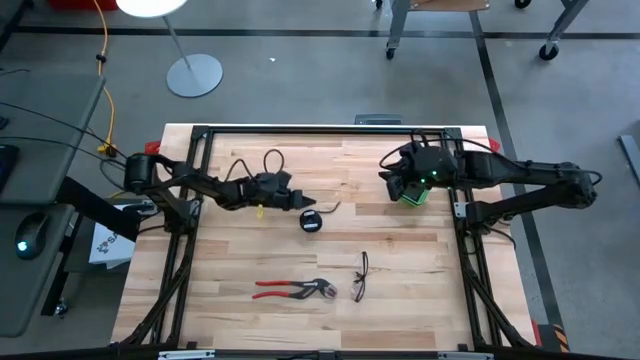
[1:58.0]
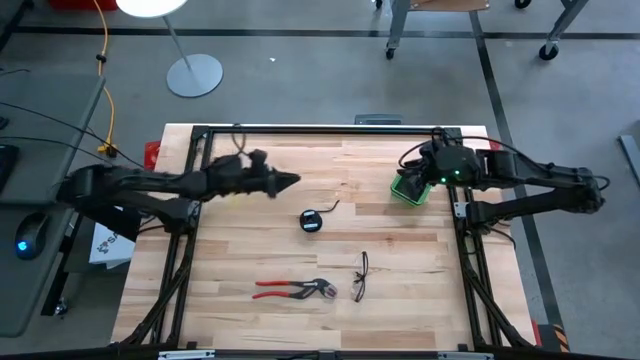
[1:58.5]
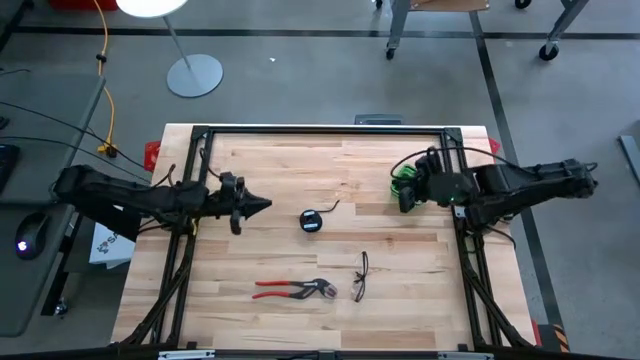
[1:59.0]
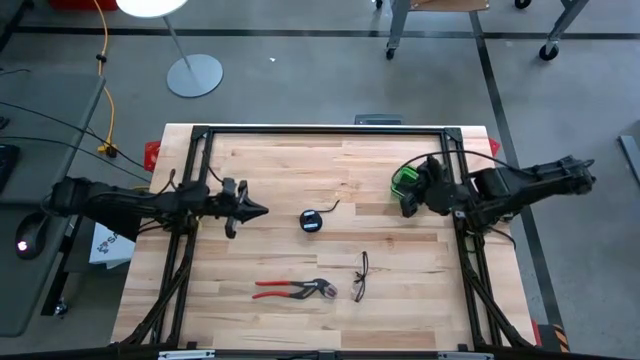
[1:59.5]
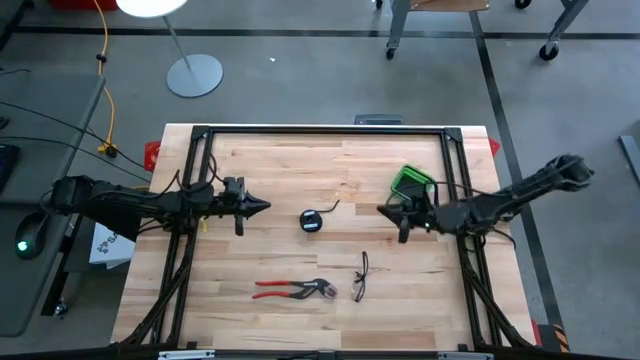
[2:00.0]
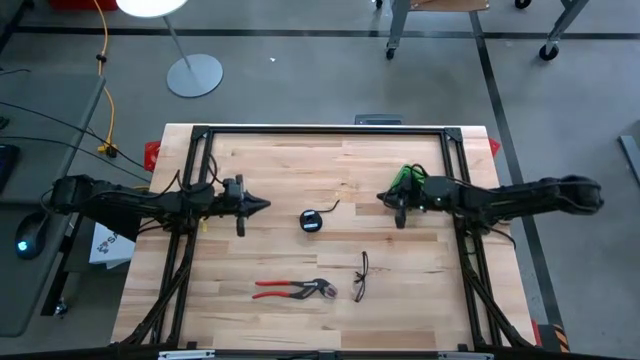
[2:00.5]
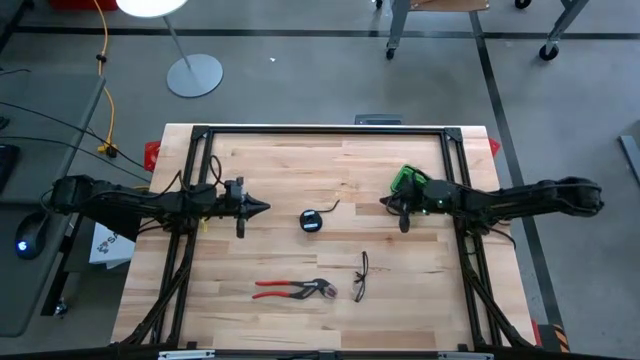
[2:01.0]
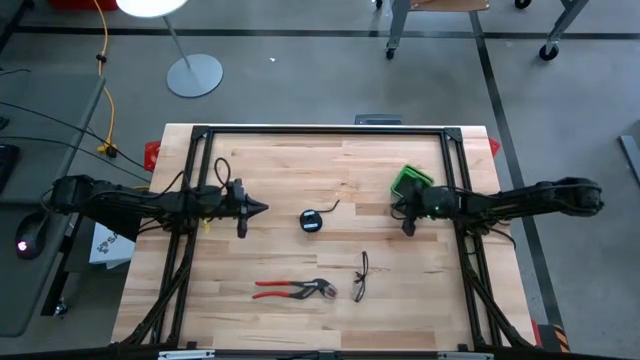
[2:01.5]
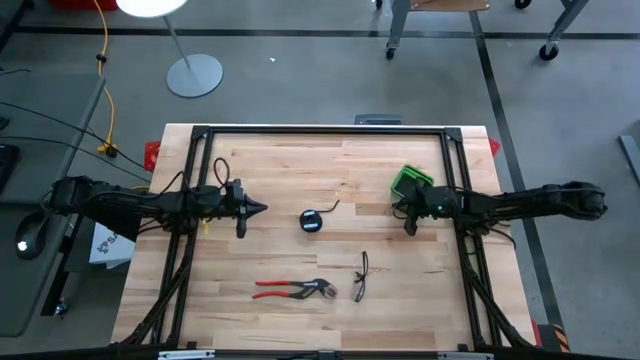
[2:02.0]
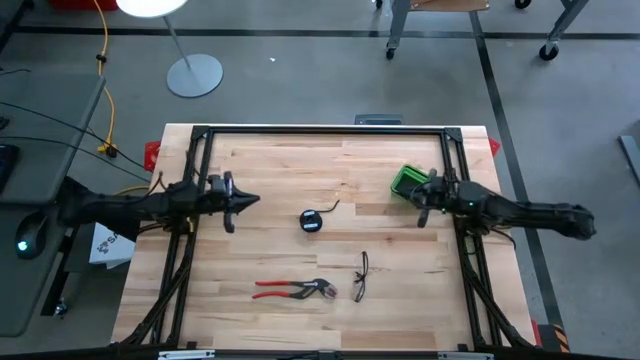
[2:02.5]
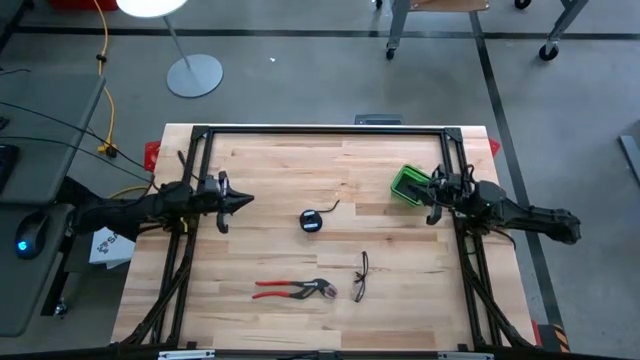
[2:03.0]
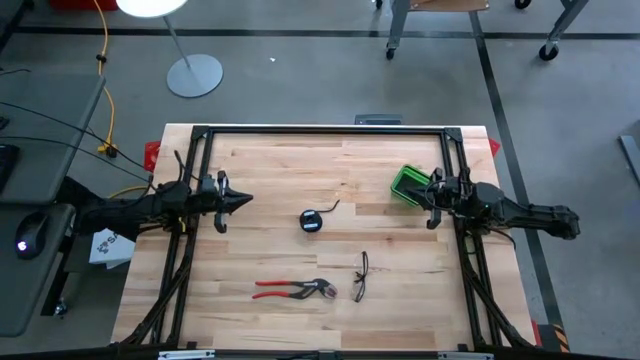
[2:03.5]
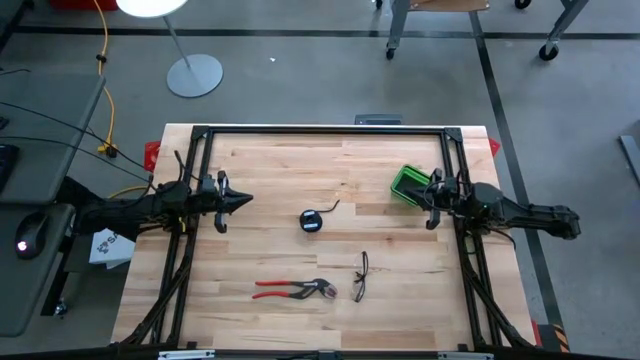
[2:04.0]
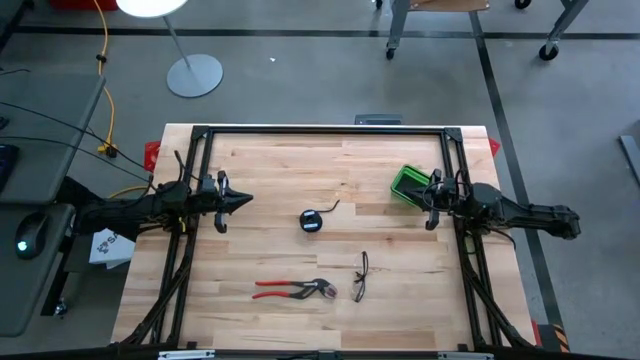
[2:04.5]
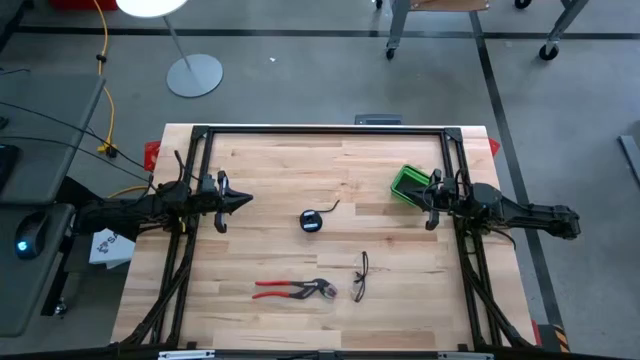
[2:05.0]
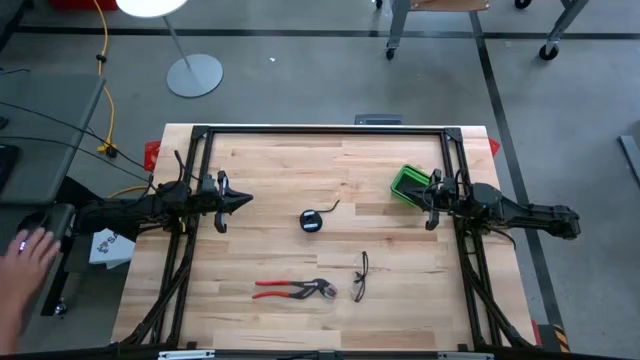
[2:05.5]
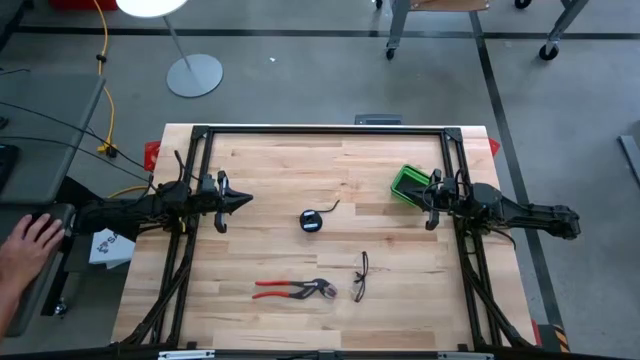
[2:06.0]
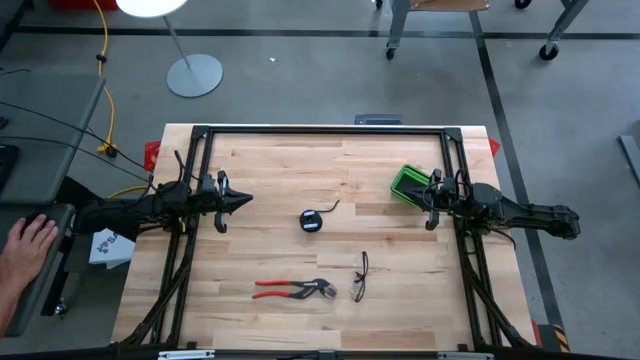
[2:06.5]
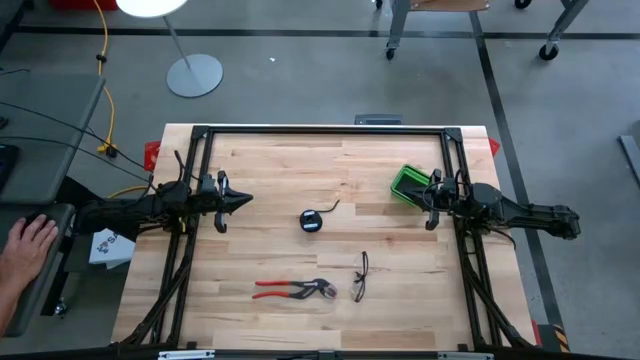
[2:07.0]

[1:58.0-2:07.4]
Task: Coil cords
Return to Home Position

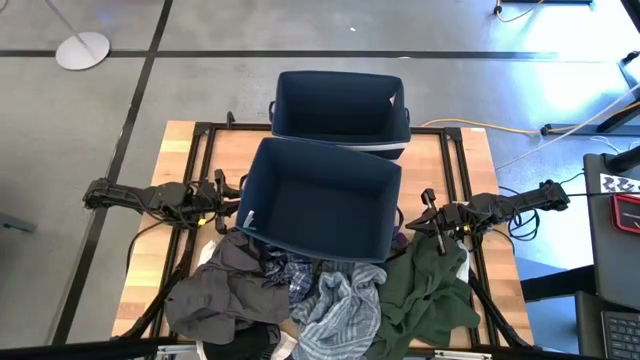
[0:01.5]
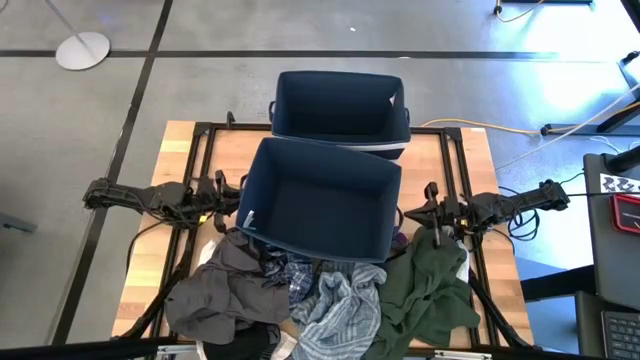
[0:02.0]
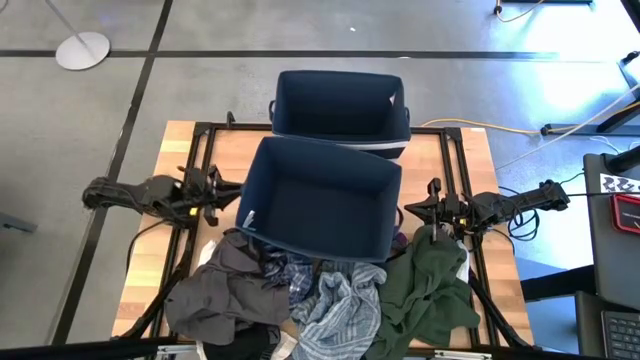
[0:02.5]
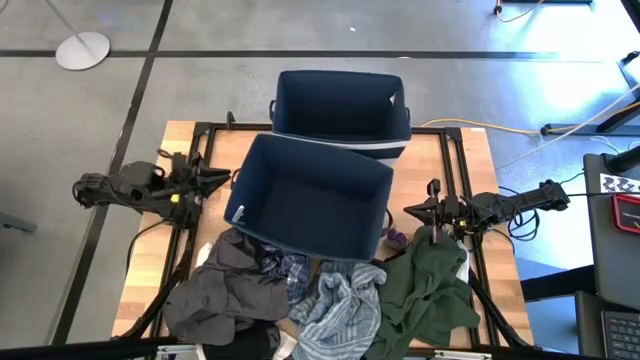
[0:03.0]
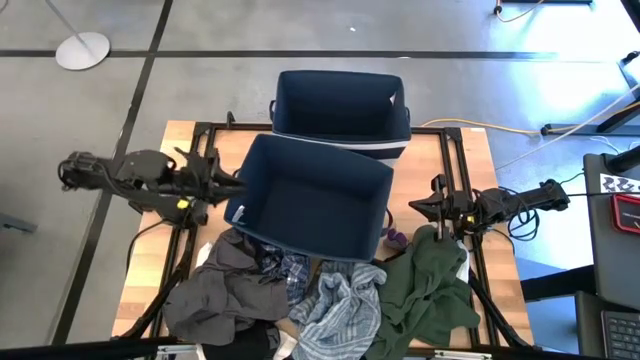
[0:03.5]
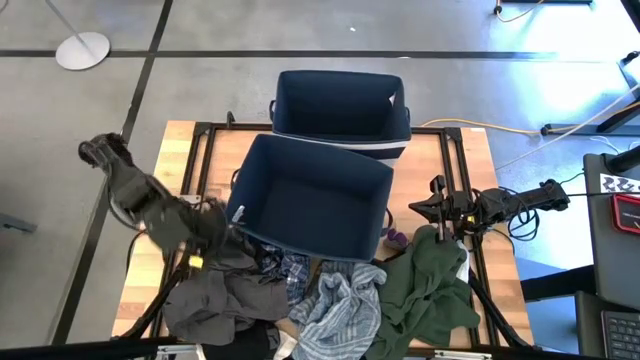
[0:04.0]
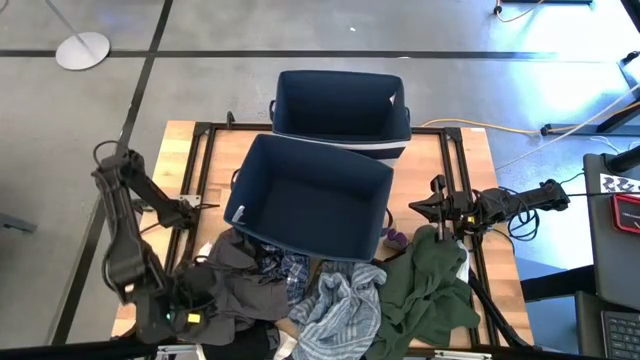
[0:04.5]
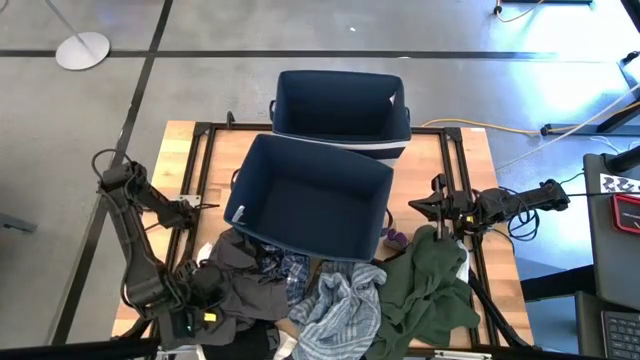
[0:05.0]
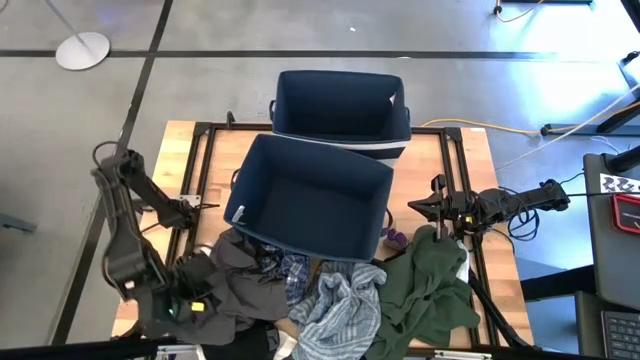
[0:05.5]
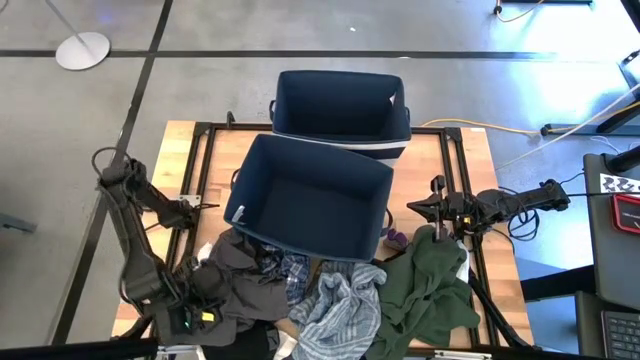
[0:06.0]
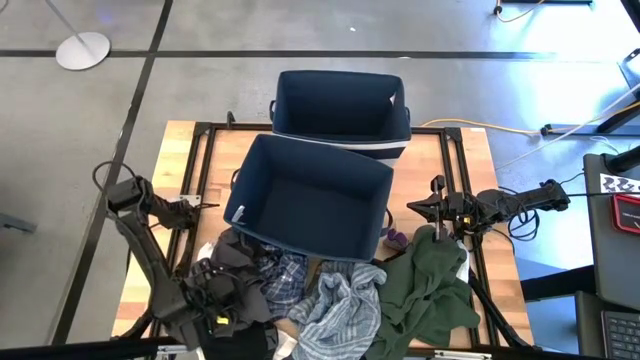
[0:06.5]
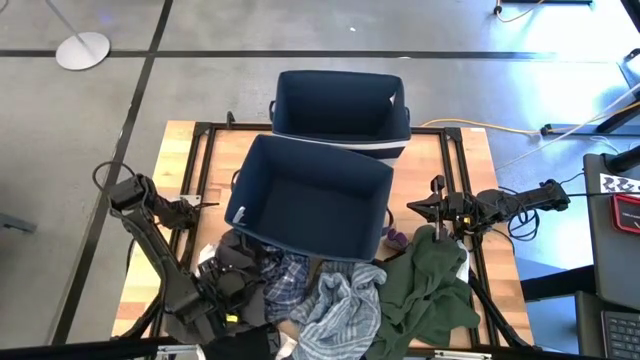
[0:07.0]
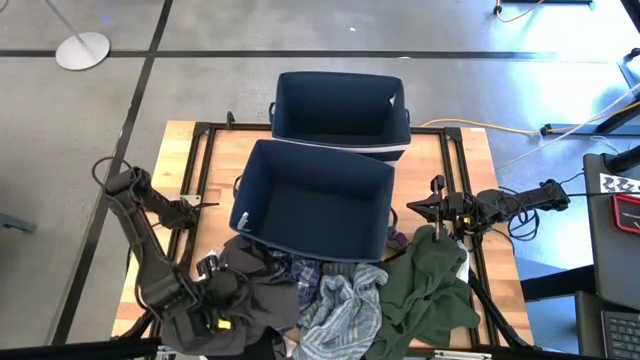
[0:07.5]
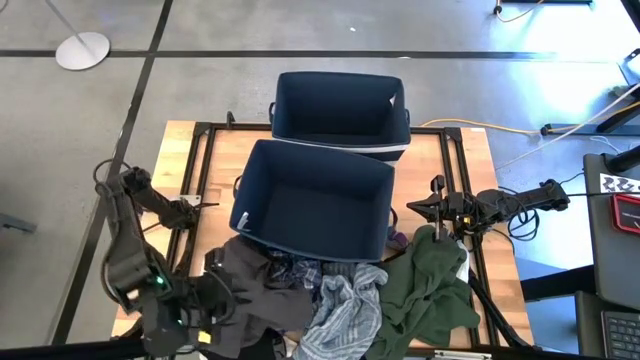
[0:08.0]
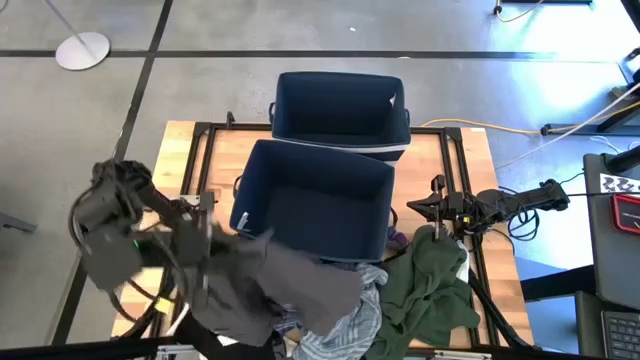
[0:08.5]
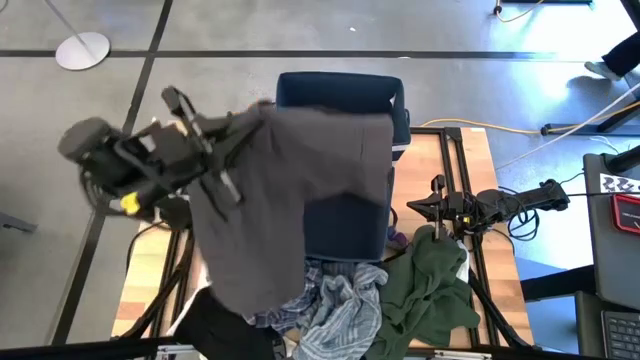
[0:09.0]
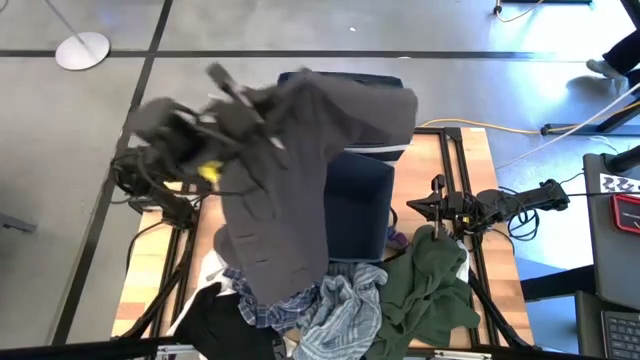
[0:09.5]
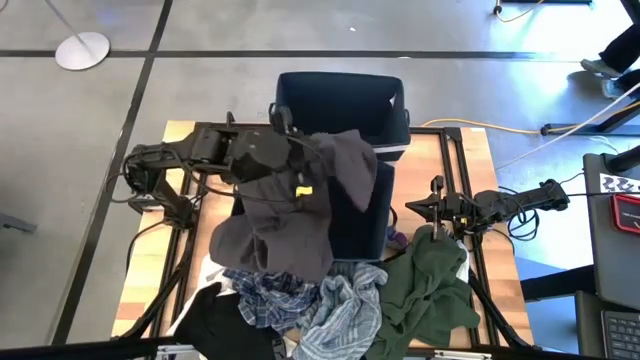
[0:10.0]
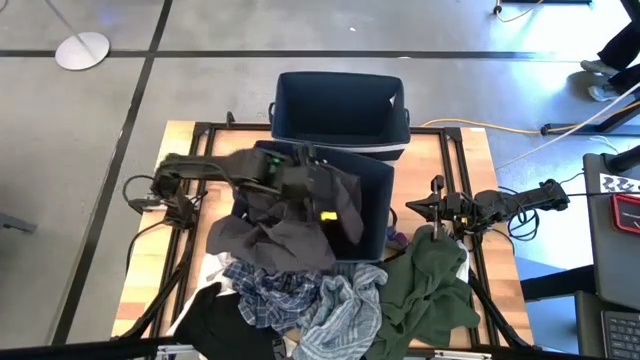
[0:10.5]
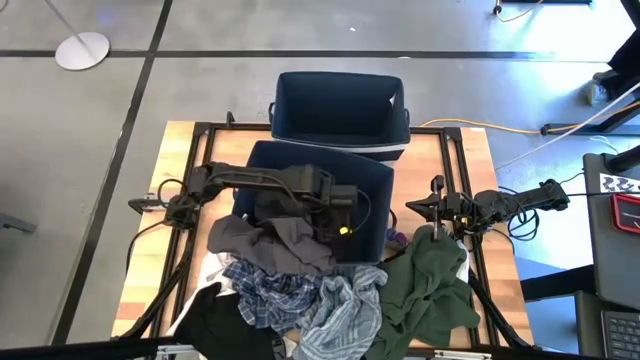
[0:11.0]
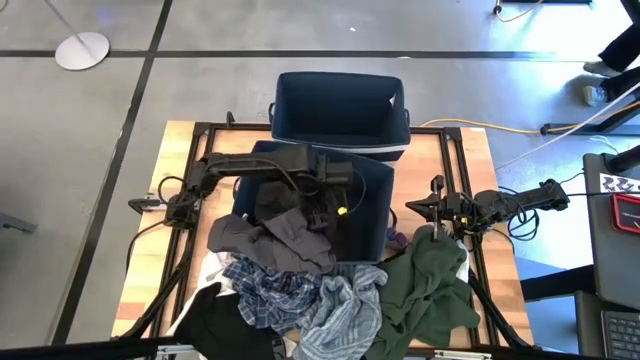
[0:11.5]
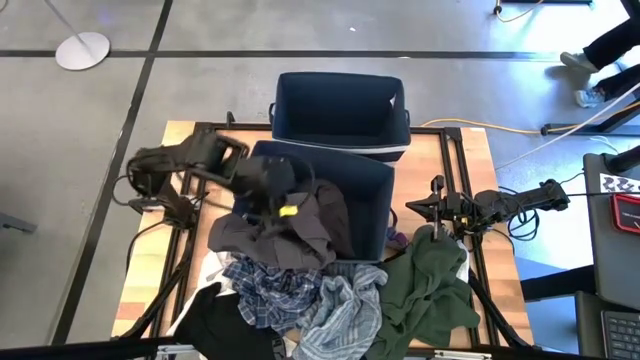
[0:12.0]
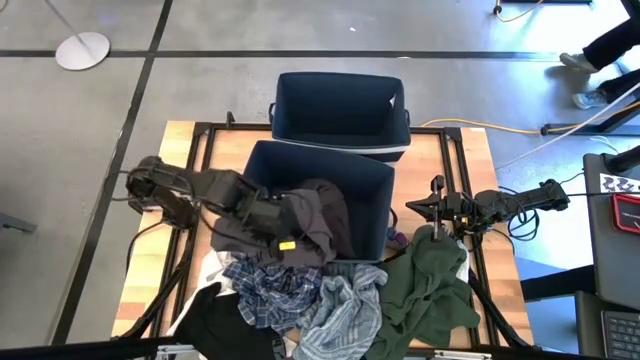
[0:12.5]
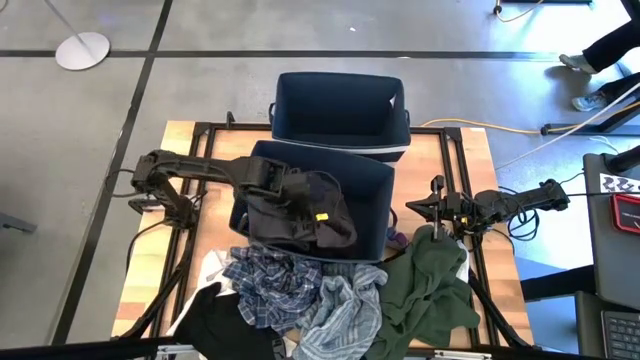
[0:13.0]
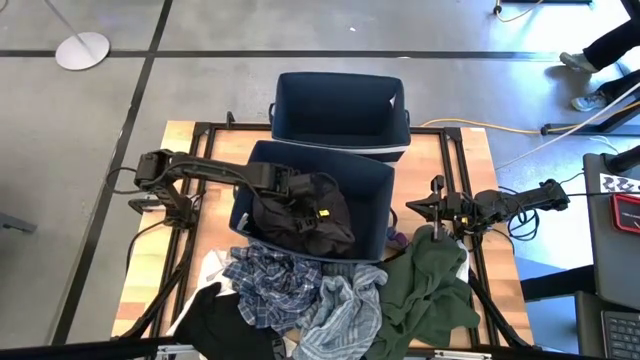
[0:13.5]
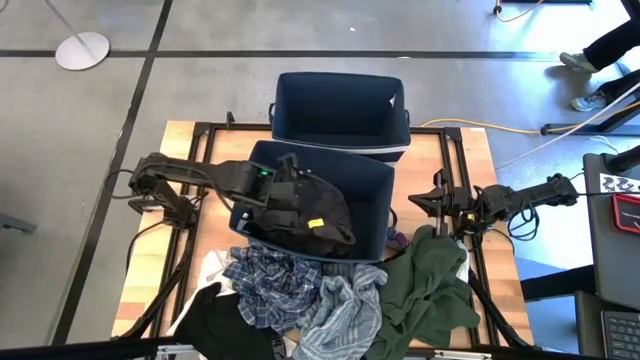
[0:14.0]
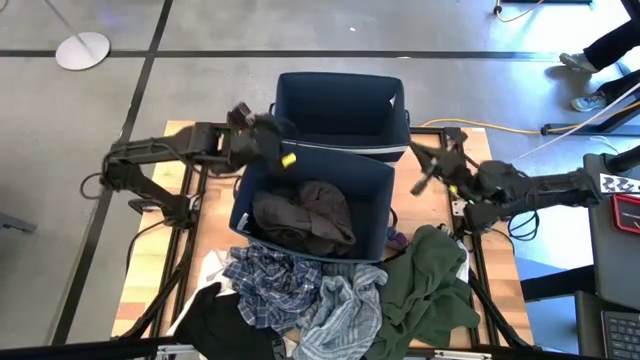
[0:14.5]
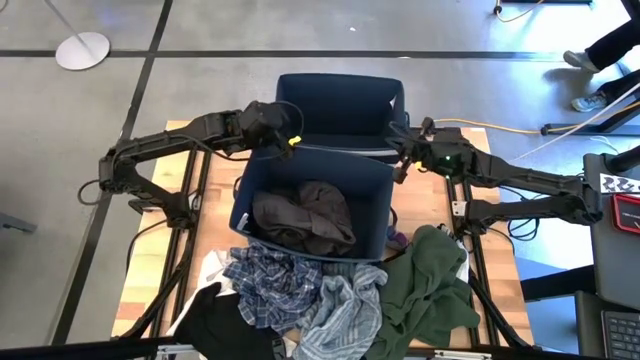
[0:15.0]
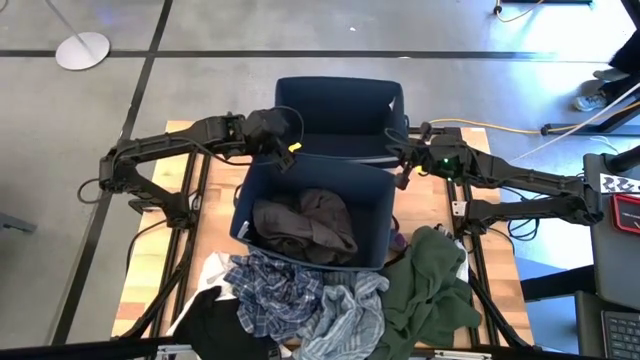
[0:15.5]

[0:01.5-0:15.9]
Task: Sort clothes
Put the gray shorts into the bottom blue laundry bin
